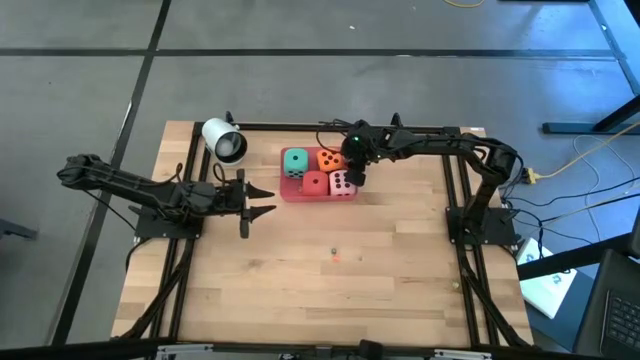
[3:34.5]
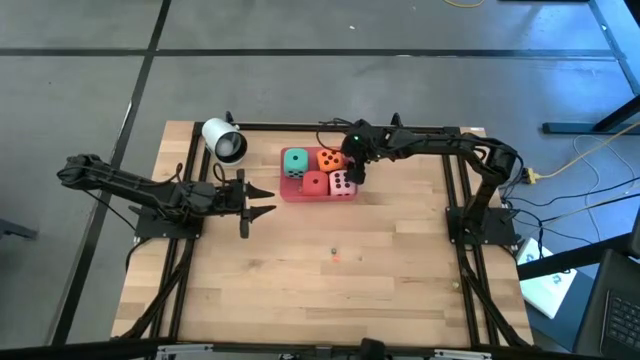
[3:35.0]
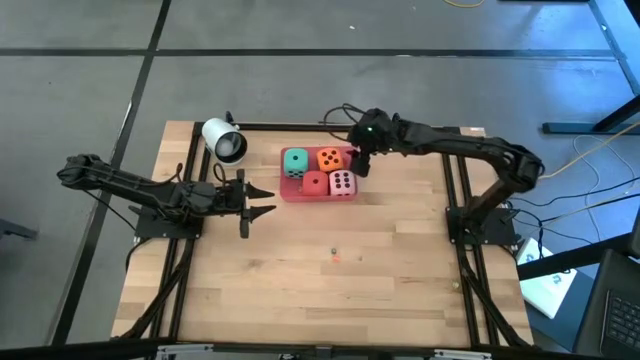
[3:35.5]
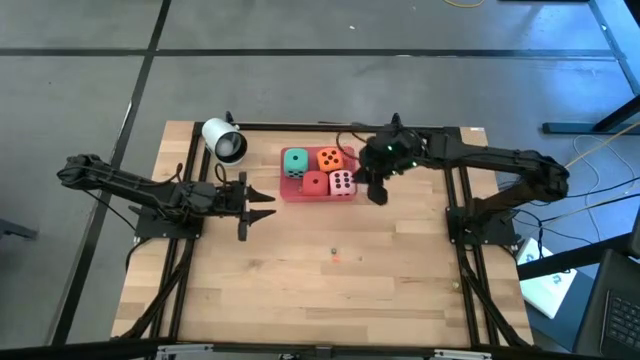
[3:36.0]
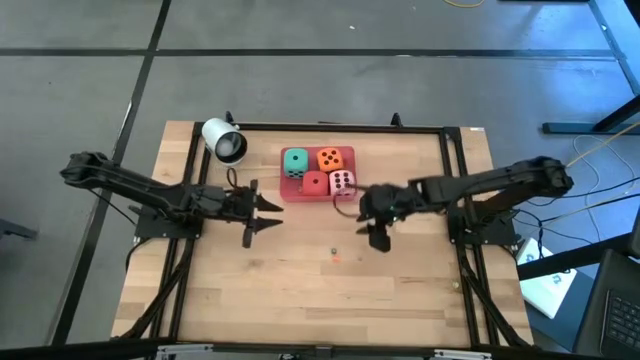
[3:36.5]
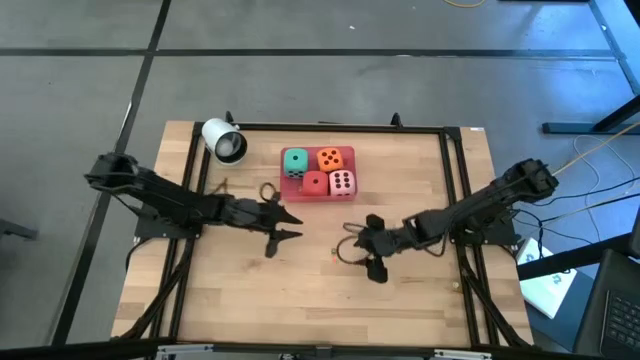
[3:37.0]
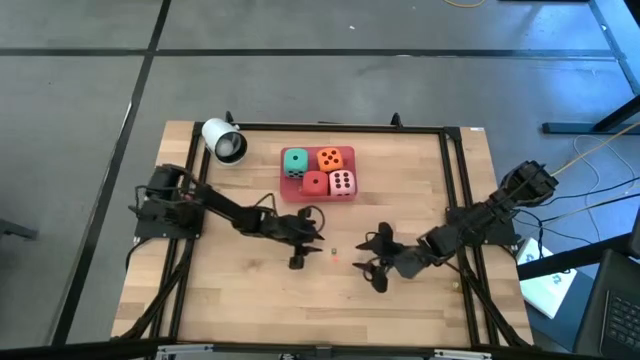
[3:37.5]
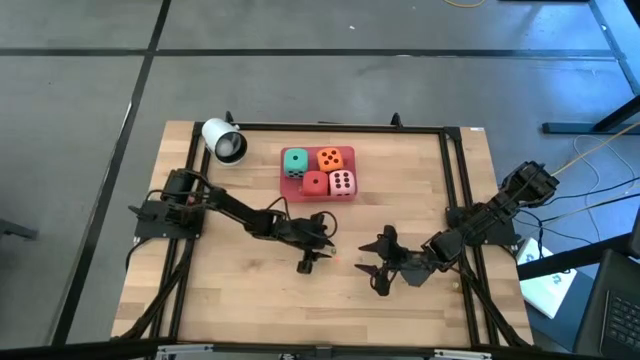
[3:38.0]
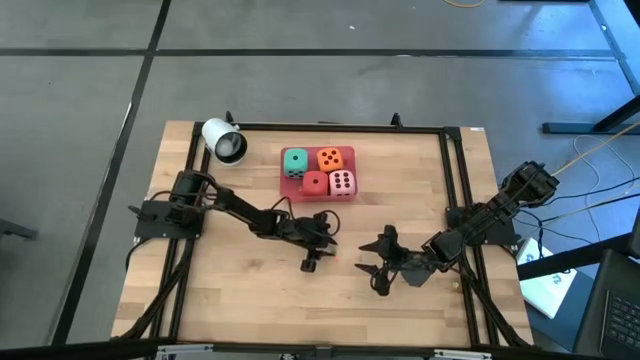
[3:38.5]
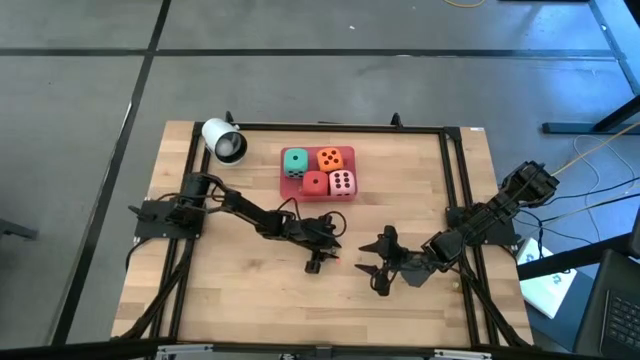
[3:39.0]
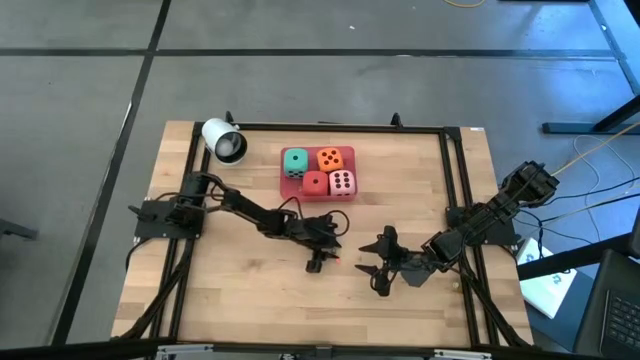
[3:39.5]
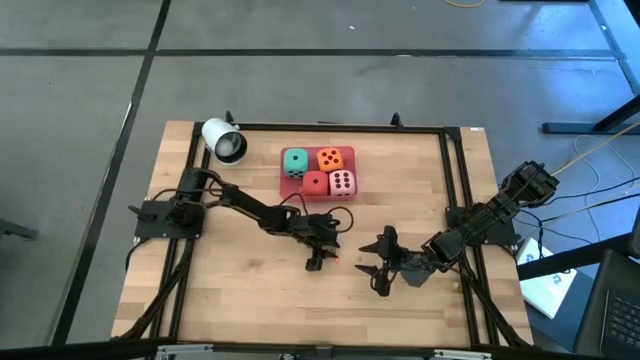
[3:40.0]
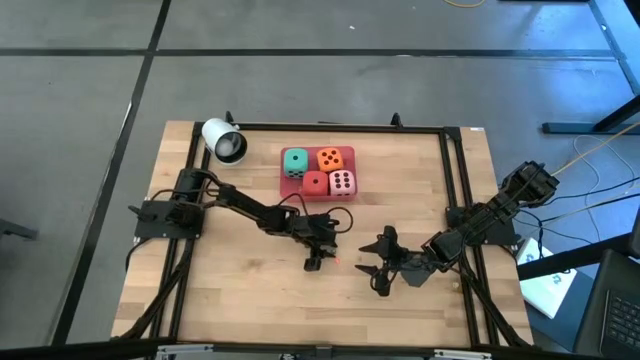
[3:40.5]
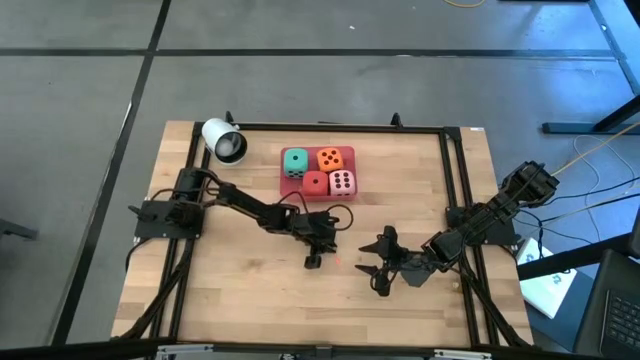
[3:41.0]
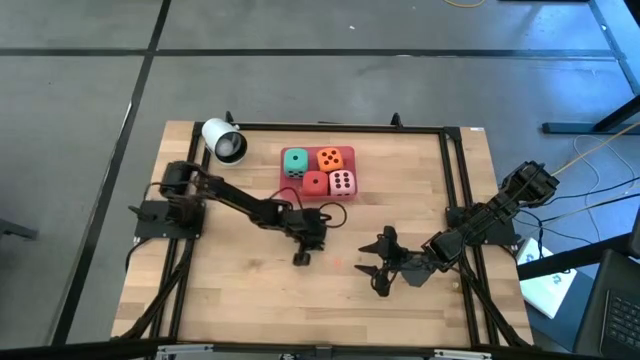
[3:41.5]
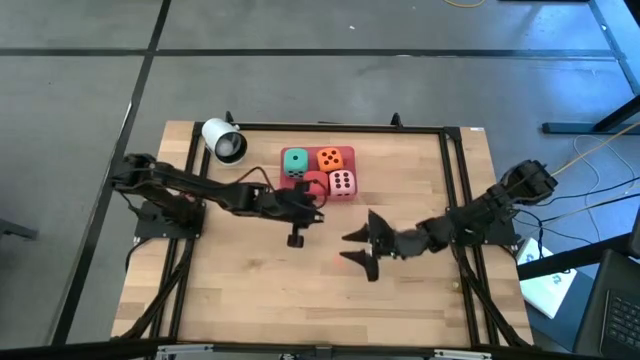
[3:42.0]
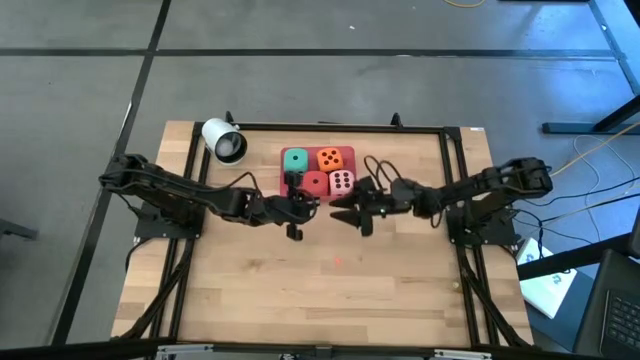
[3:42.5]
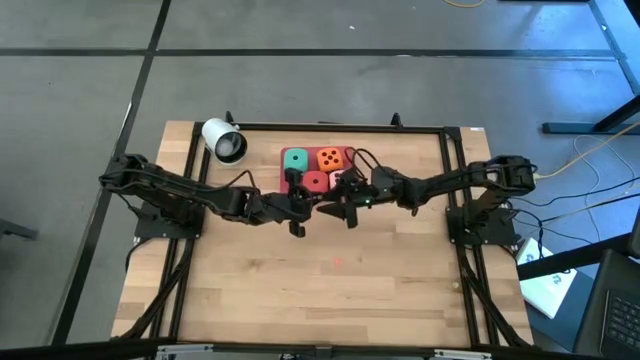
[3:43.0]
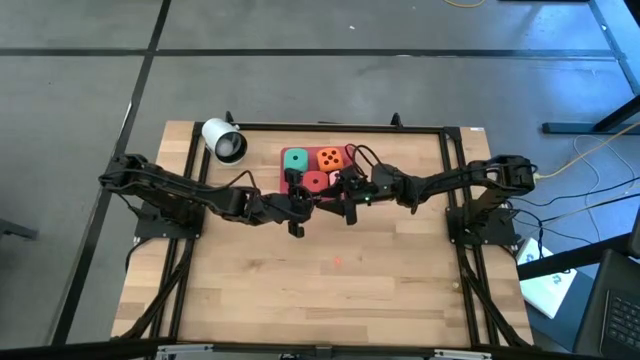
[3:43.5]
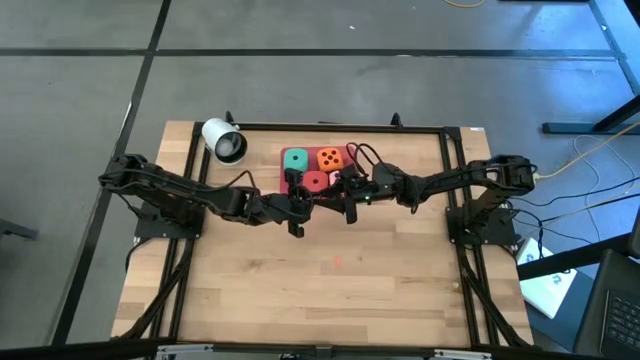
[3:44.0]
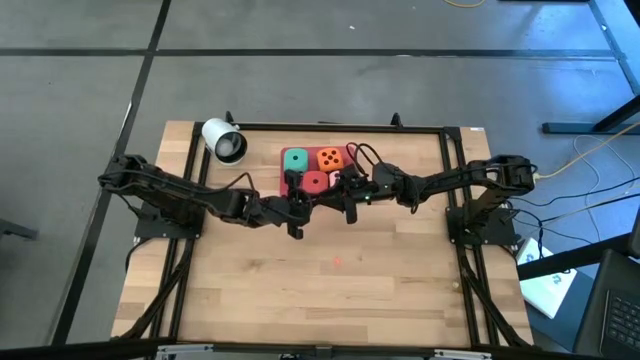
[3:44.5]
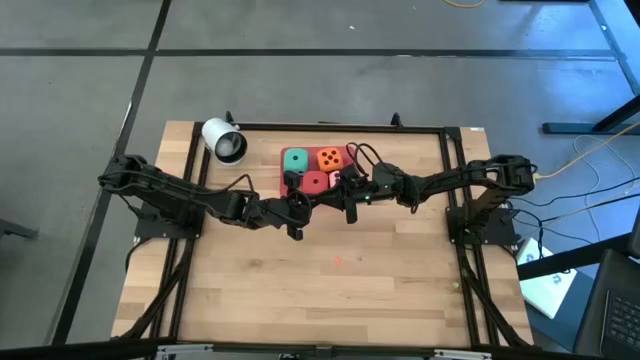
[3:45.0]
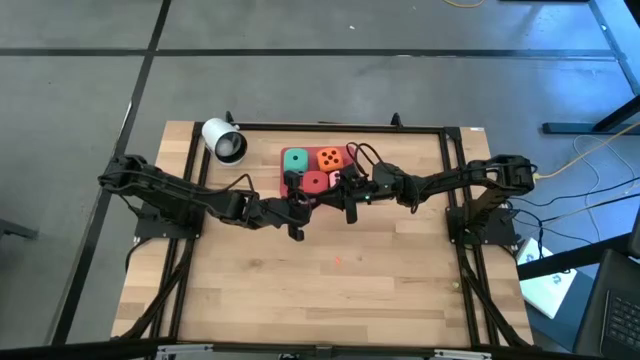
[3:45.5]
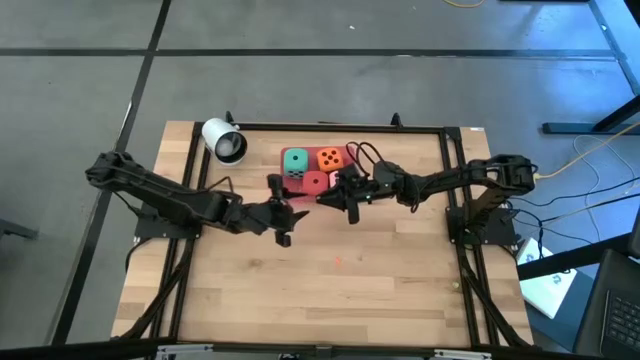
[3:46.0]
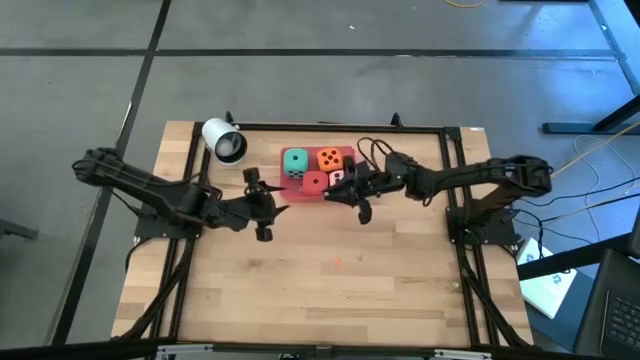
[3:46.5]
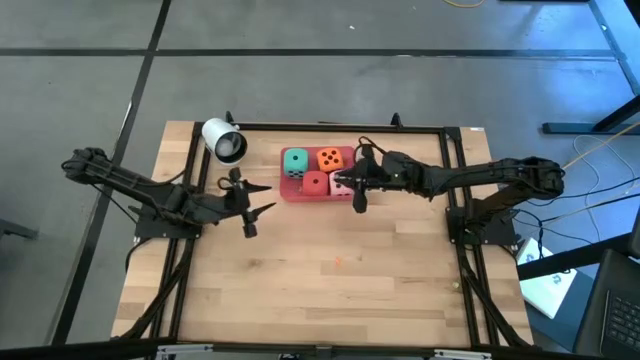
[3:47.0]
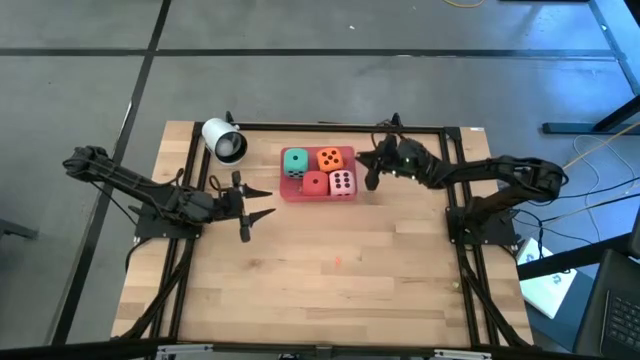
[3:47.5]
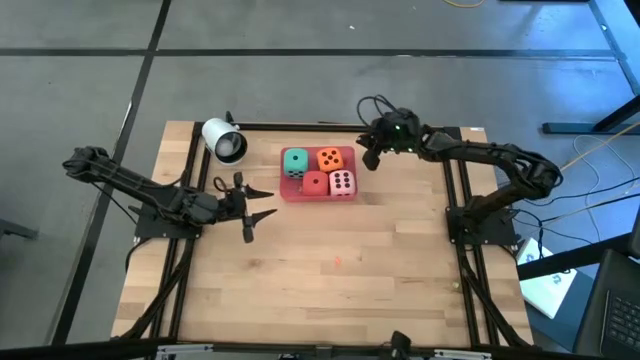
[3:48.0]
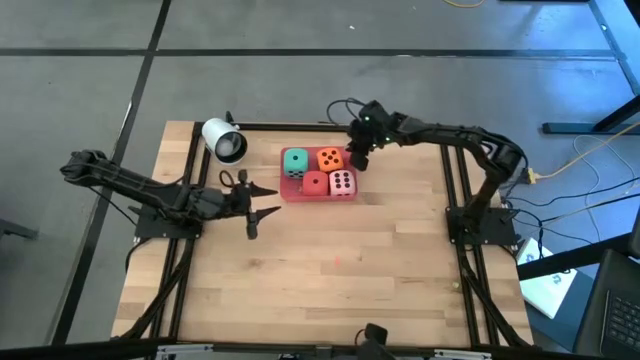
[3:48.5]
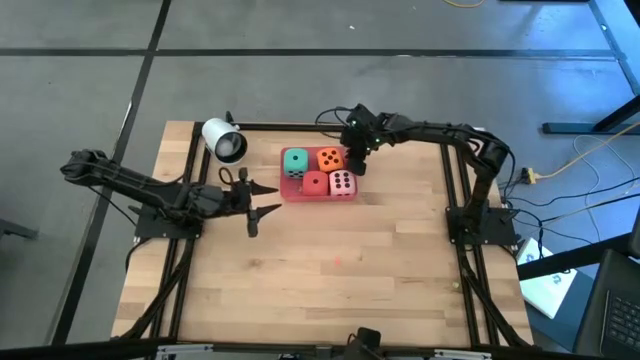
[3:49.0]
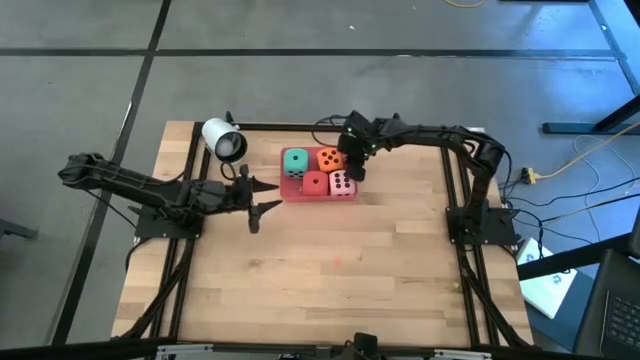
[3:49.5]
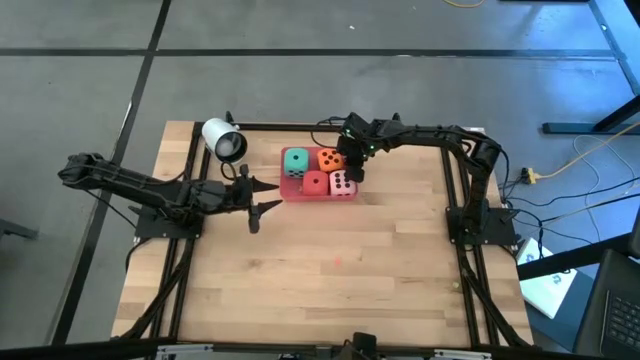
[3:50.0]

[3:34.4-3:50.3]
Task: Pick & Place Dice
Put the small green dice into the pink bin

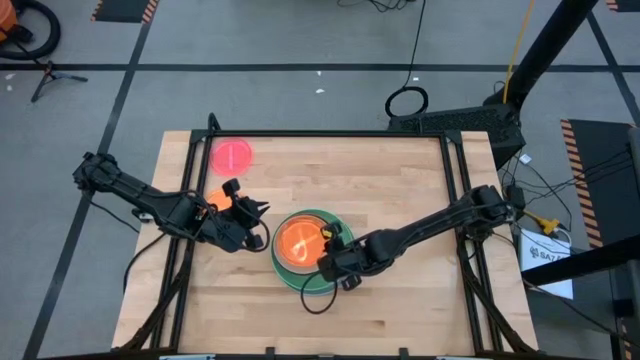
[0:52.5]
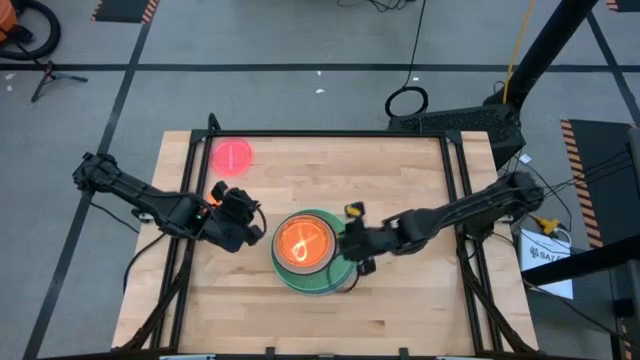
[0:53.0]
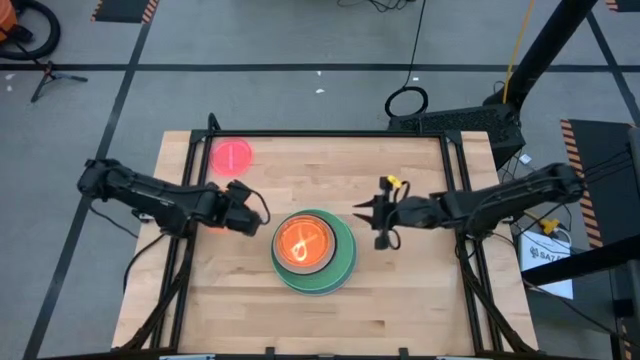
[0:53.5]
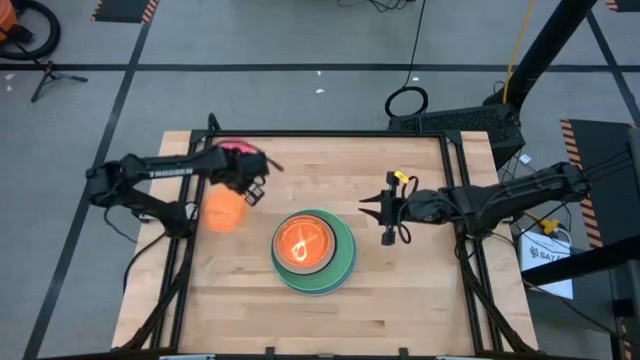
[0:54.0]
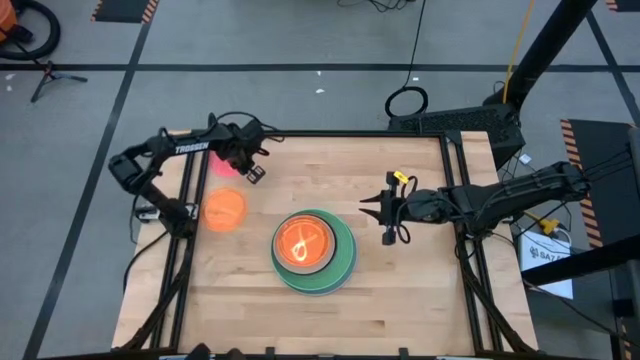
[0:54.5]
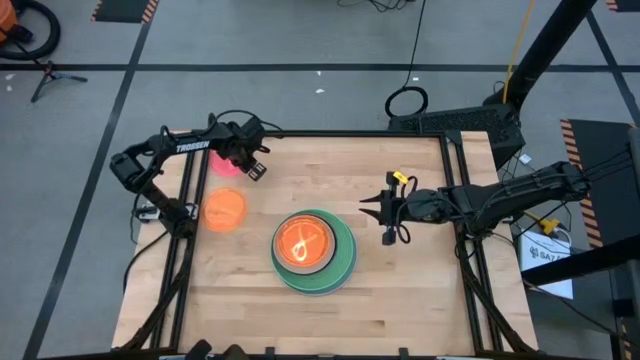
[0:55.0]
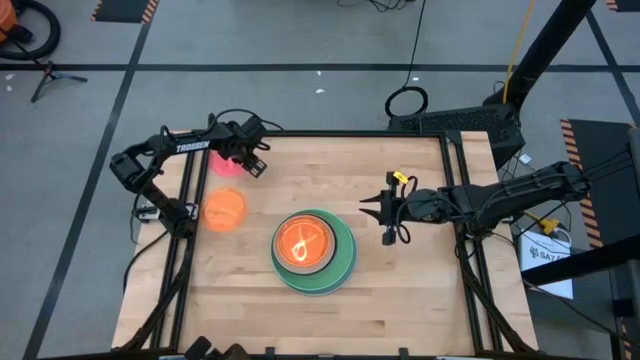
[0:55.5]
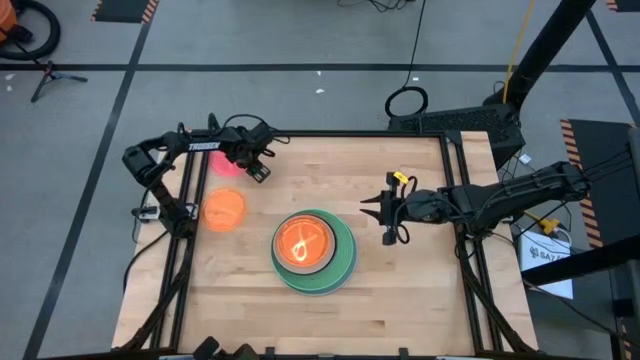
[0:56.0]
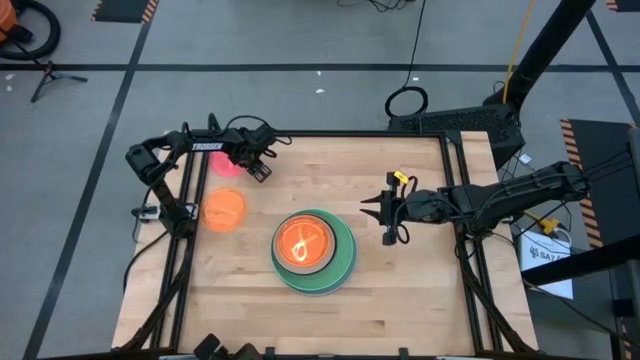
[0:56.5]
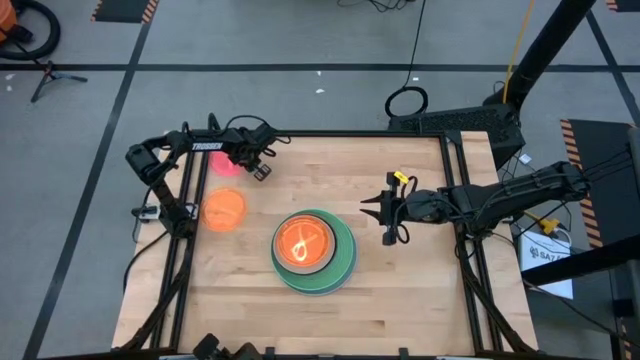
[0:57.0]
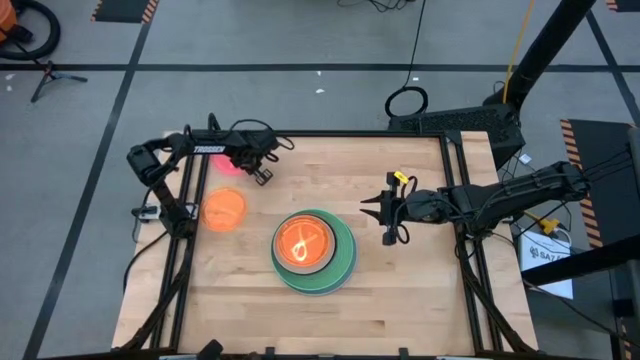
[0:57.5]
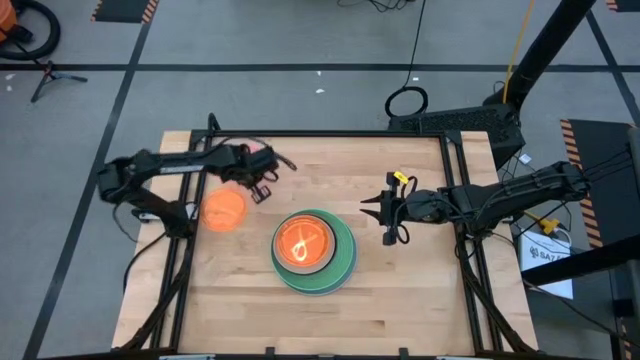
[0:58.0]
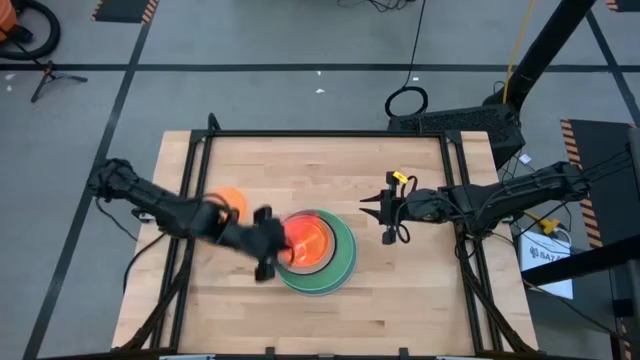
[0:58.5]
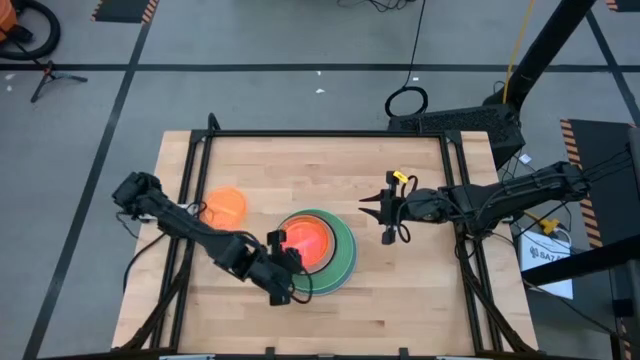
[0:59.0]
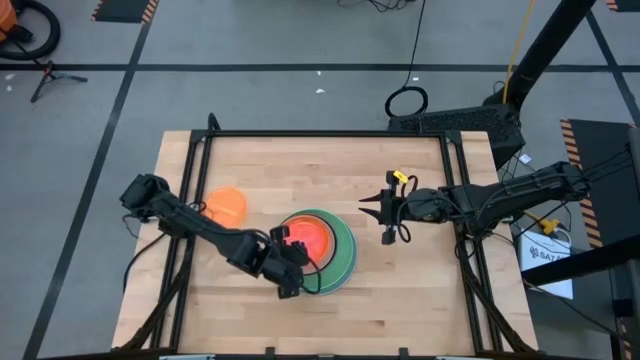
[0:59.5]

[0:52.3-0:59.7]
Task: Stack plastic plates
Stack the pink plate on the orange plate
